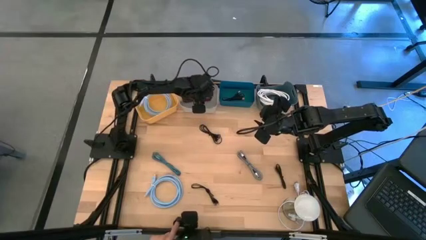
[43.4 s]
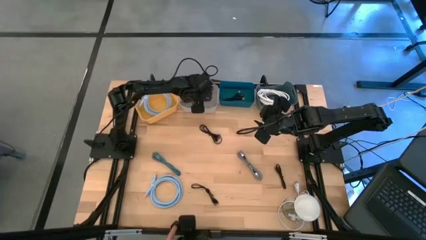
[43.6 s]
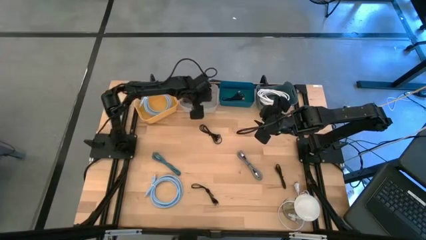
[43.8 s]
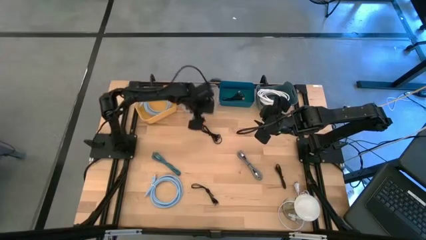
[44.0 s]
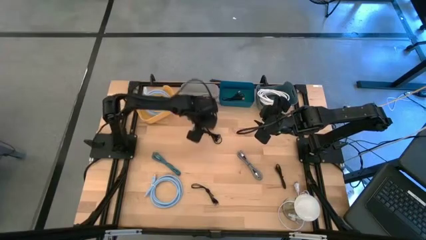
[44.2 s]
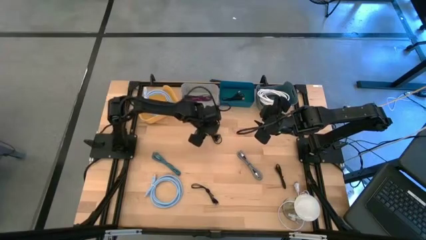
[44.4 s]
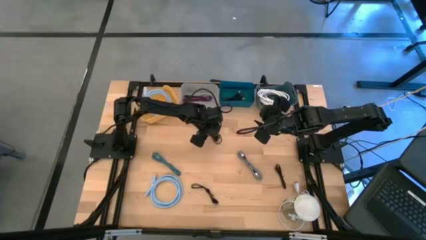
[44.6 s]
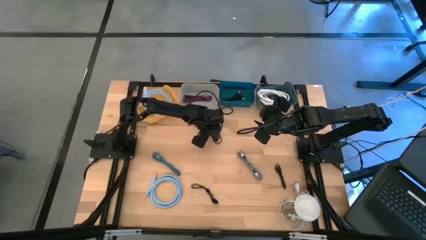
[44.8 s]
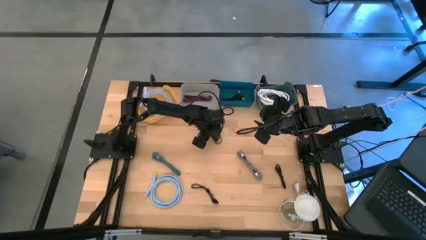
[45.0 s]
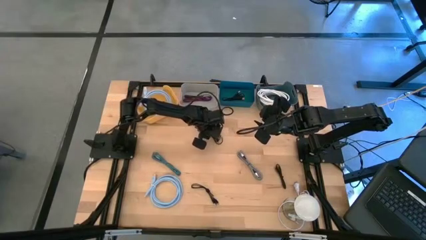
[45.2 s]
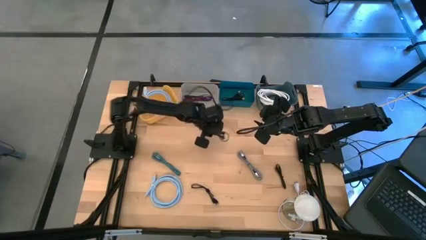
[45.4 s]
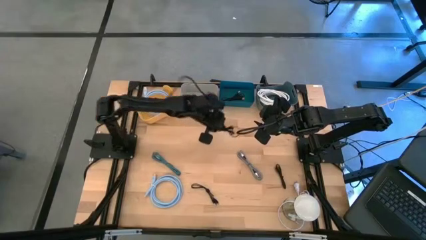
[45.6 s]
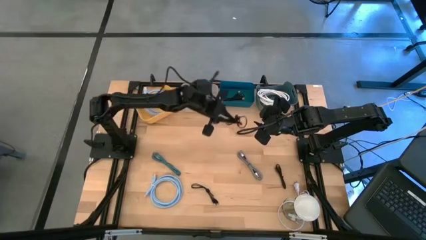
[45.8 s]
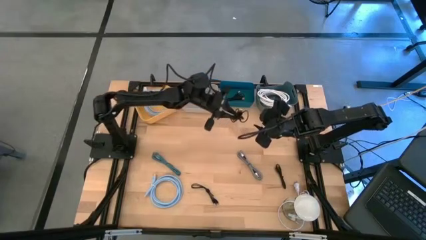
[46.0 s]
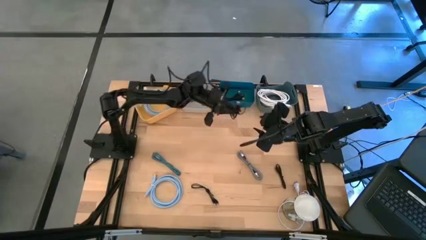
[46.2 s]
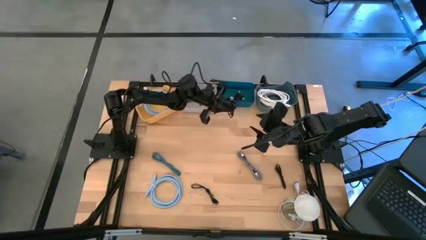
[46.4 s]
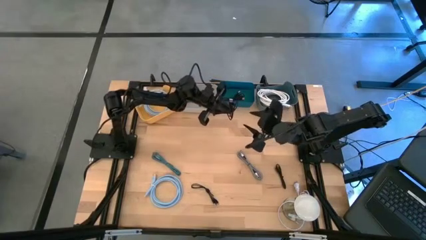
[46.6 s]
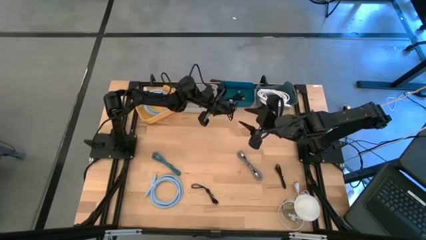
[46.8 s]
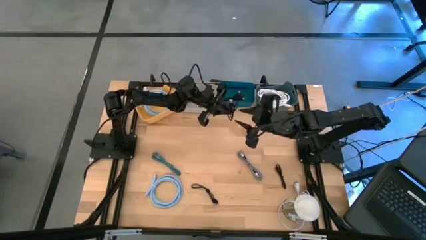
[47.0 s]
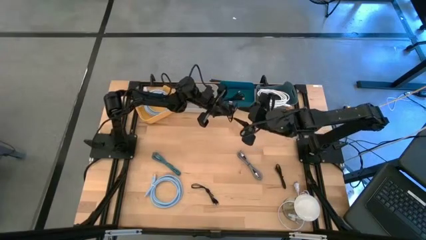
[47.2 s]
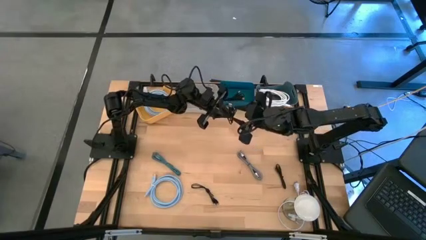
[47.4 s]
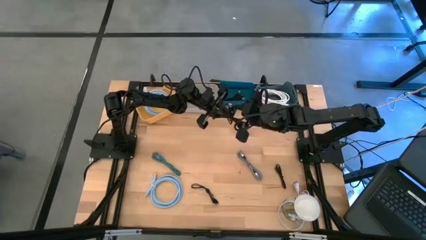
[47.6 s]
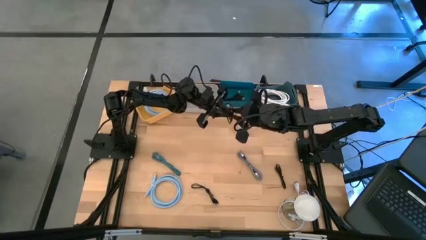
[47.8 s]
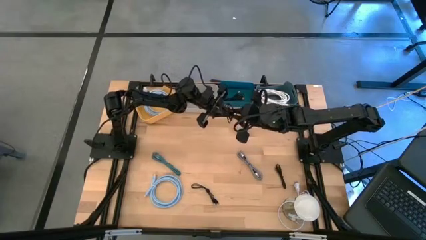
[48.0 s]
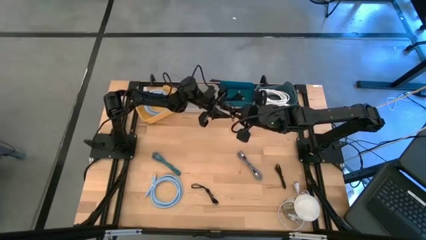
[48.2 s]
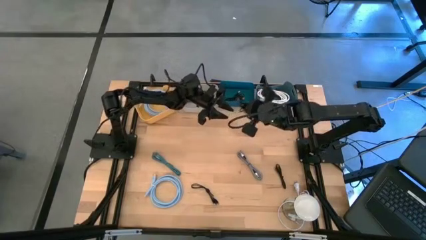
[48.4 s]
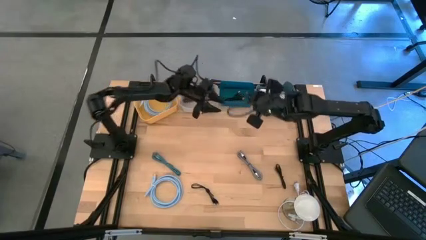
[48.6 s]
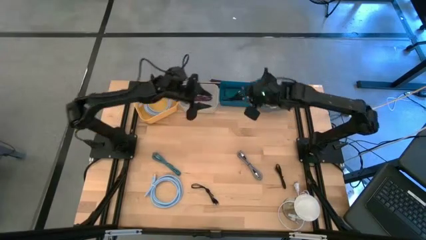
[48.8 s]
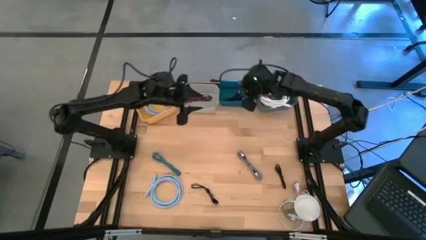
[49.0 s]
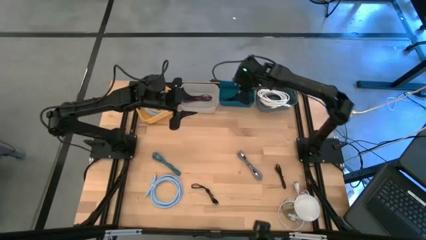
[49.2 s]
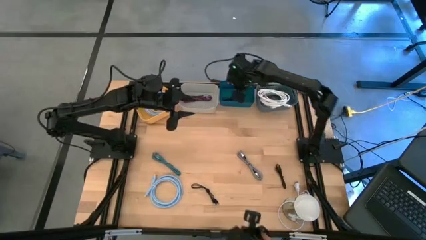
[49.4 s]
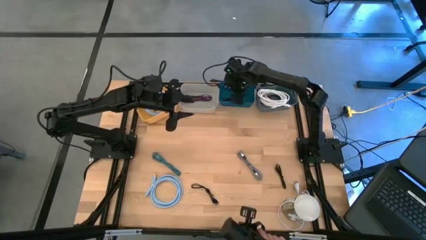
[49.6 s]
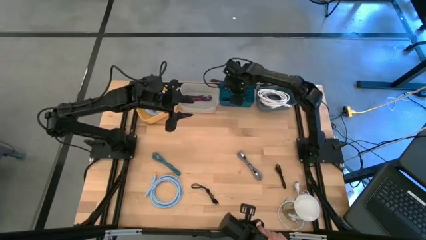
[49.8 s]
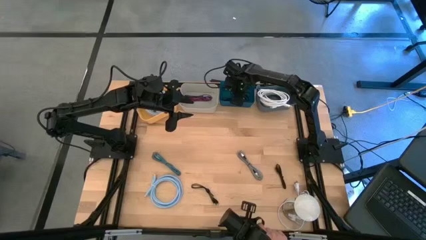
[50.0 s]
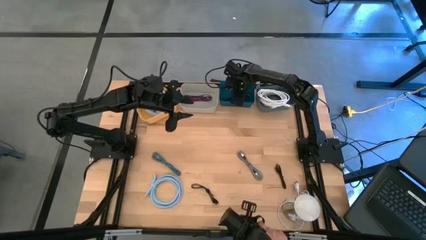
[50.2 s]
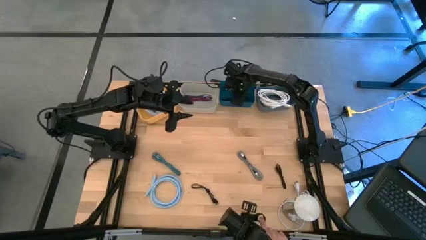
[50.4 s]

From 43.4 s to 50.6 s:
Task: Pick & Place USB Port
Put the black charger cable into the dark blue bin

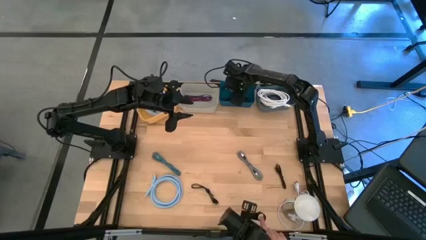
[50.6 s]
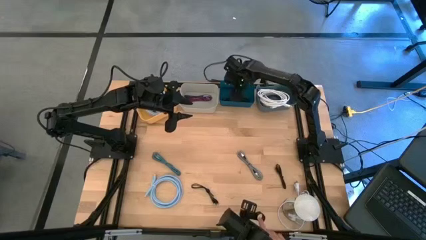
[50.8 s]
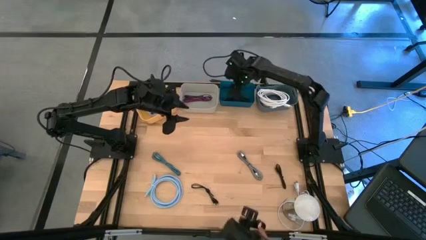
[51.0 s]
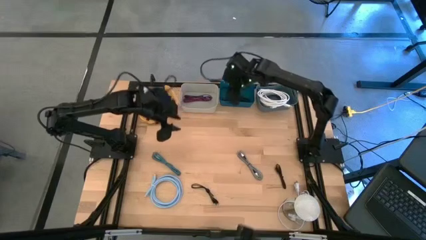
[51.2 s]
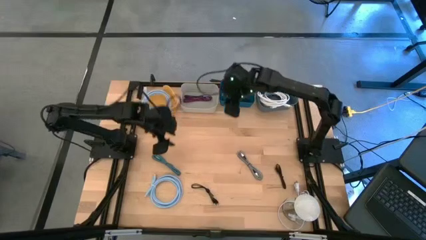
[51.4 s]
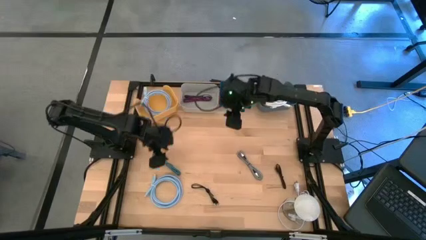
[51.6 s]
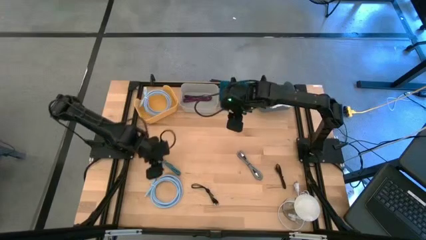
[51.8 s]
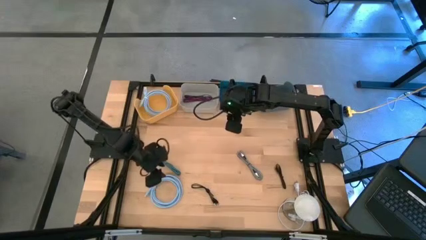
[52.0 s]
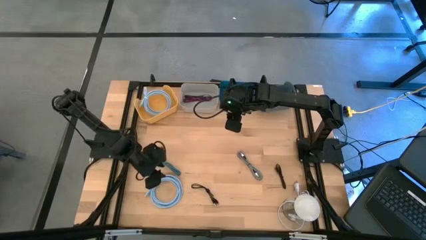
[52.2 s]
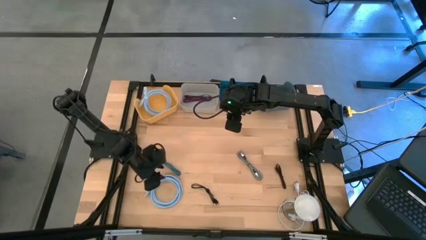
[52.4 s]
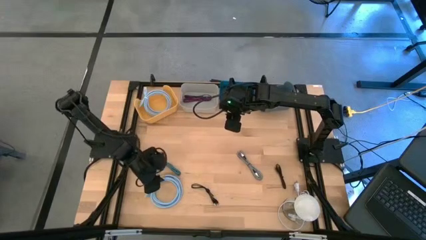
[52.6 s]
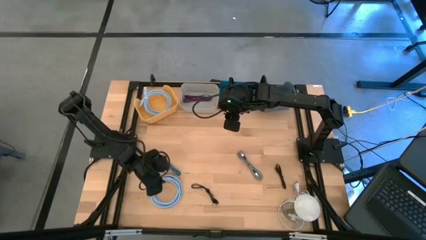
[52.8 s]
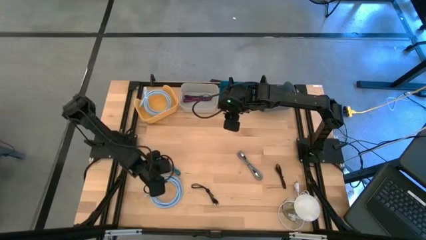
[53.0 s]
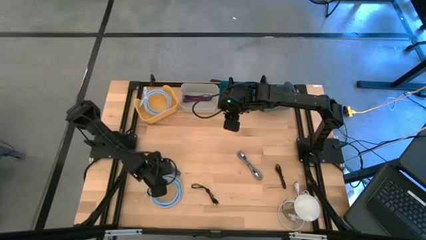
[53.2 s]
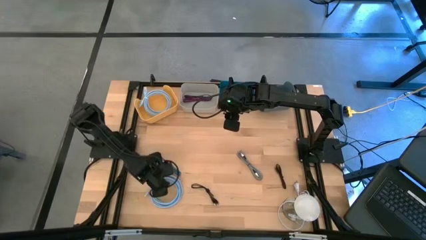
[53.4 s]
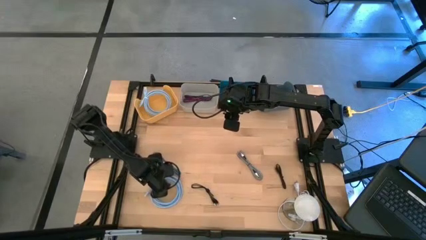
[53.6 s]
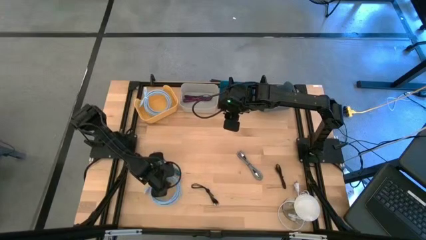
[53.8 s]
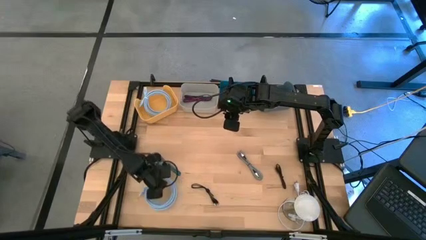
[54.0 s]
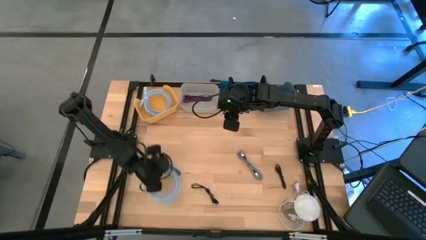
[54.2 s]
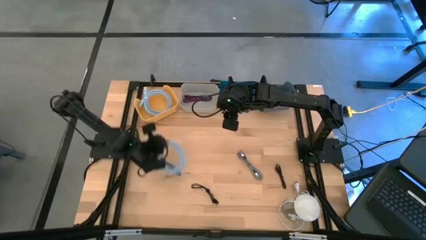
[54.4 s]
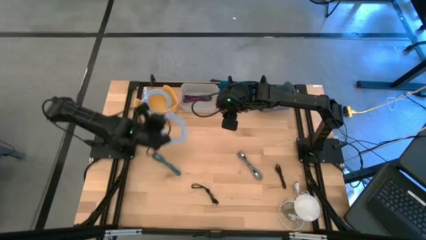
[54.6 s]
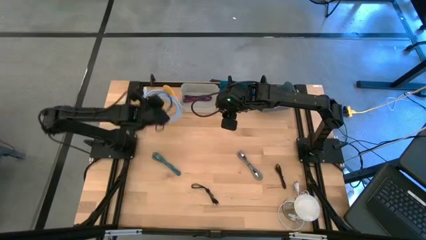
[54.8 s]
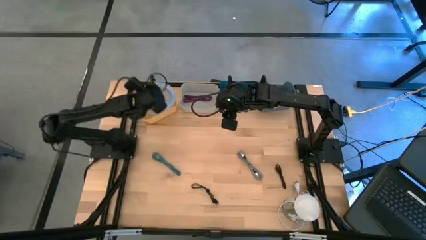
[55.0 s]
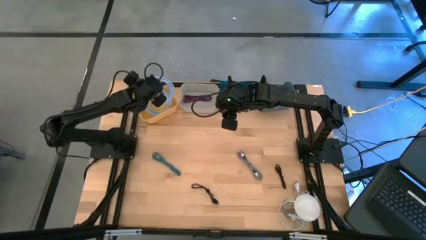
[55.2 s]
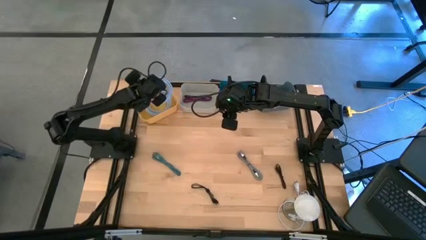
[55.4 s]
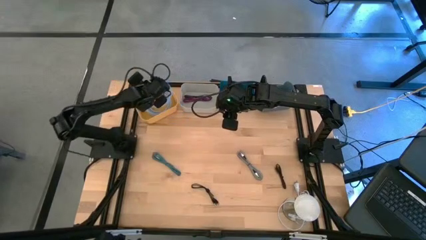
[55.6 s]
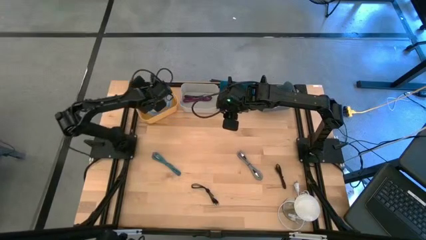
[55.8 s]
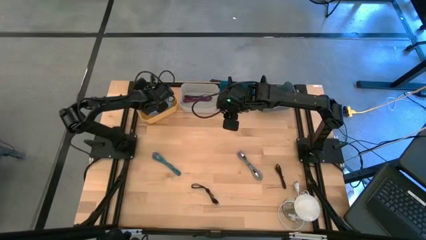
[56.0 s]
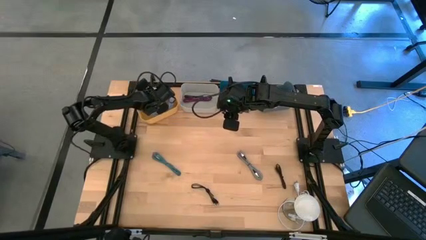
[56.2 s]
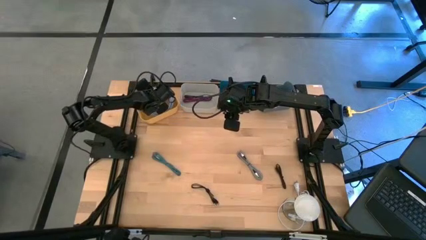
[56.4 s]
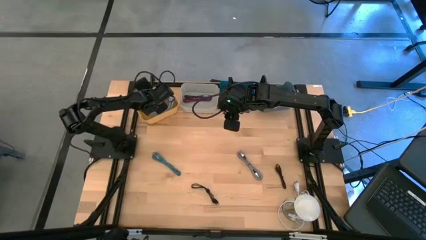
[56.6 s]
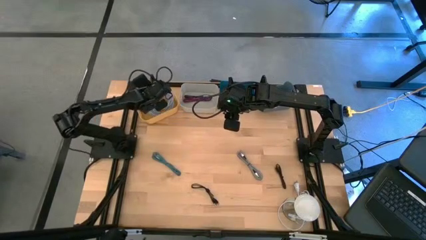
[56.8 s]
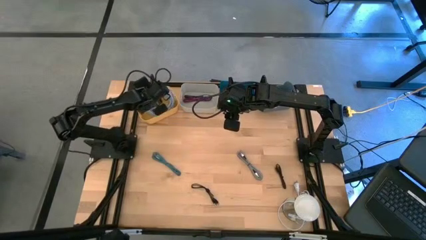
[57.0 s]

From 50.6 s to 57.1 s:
Put the blue HDMI cable into the yellow bin

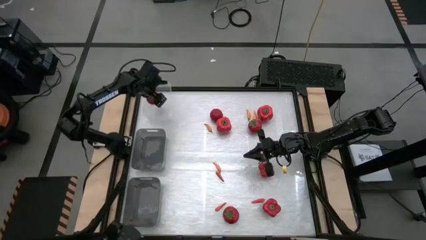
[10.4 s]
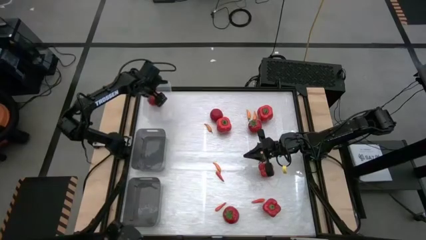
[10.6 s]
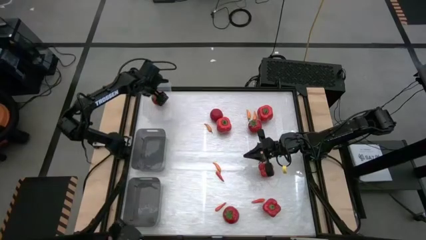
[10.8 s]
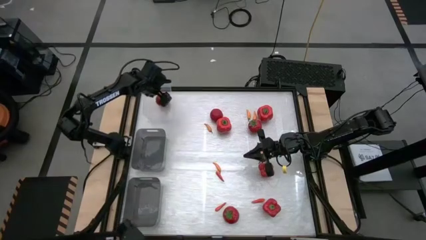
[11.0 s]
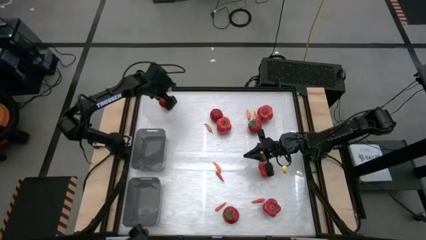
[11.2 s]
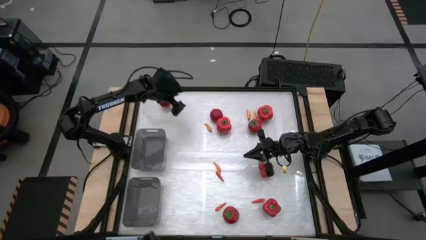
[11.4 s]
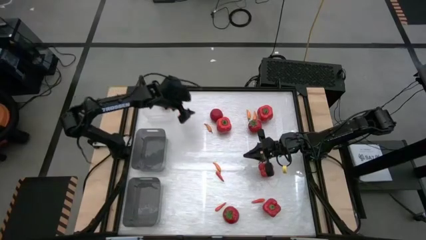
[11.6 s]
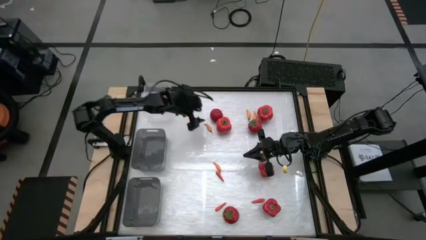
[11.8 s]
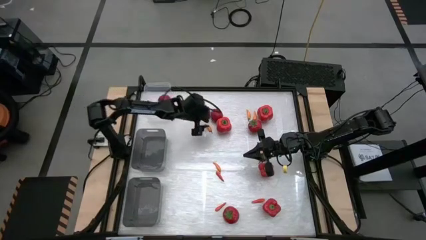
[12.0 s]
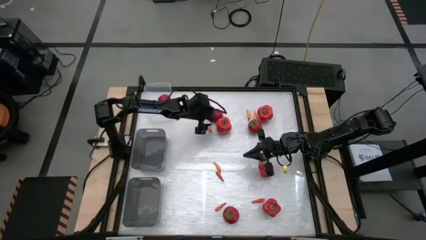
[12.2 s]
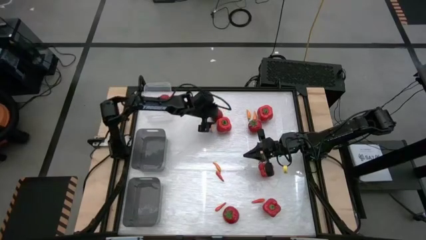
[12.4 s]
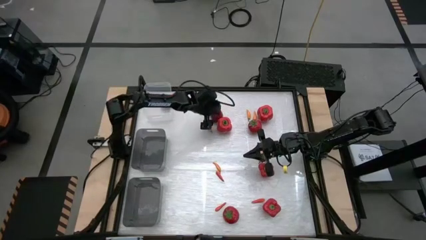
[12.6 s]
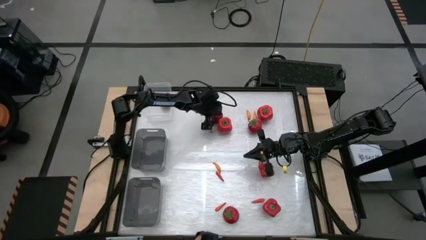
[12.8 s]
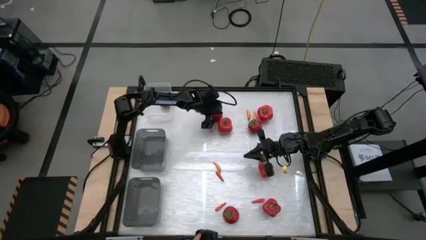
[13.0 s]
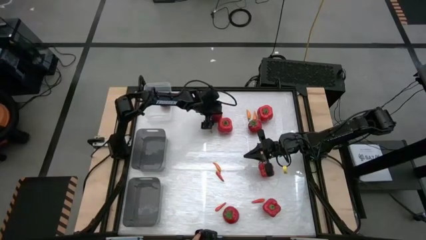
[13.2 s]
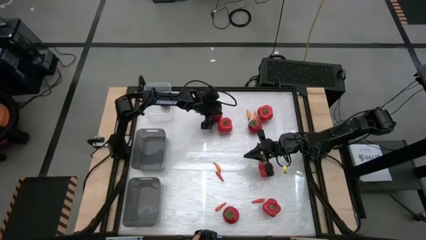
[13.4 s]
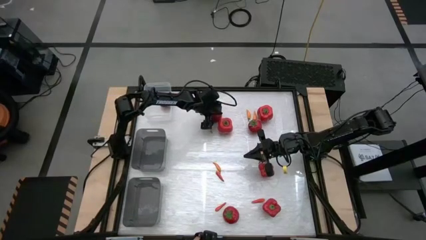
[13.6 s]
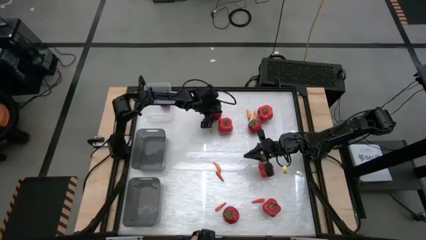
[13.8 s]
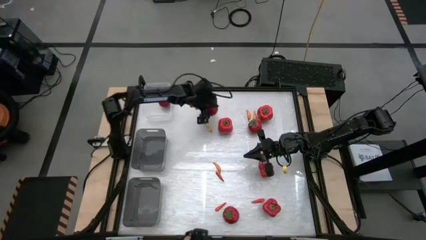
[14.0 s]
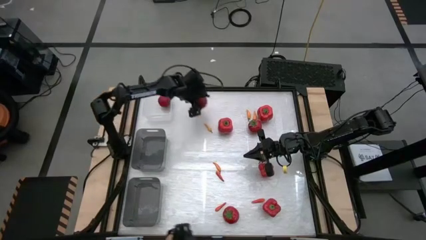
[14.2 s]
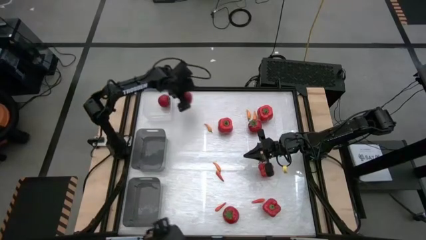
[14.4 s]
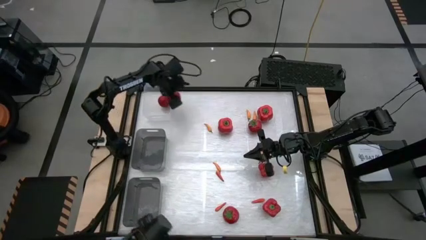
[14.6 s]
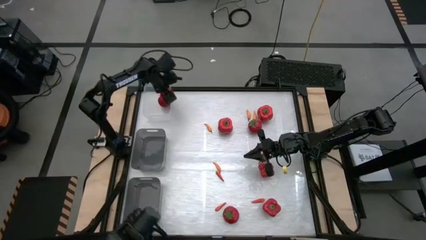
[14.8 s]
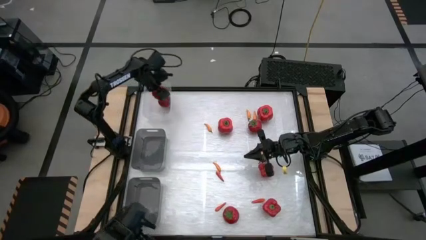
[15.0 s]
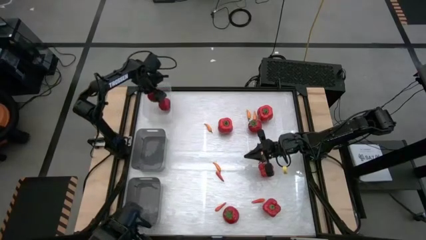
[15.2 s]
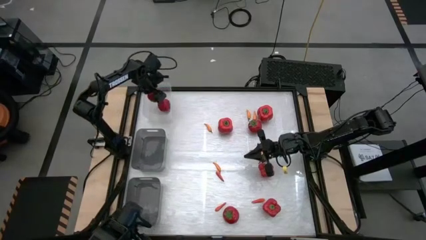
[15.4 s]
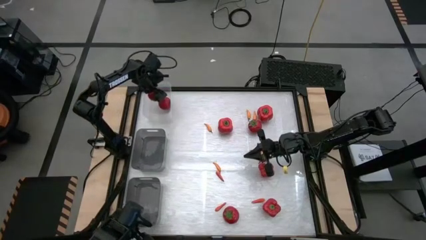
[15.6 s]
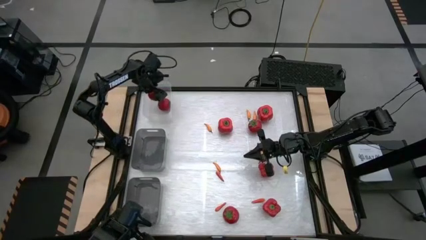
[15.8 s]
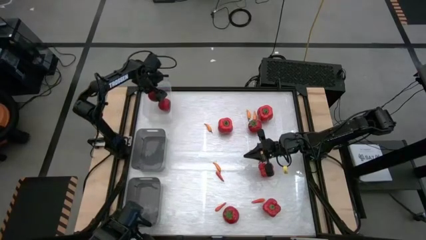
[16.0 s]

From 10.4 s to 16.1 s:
Task: Sort produce into baskets
Put the tomato into the transparent bin
